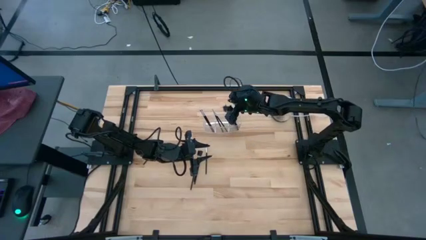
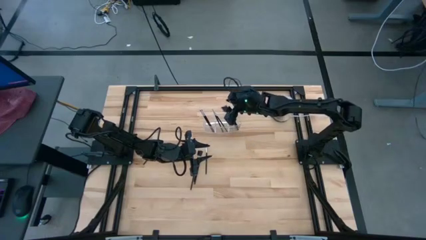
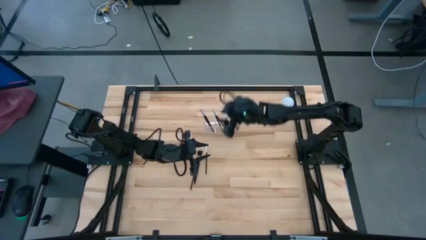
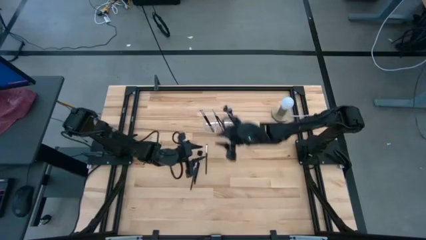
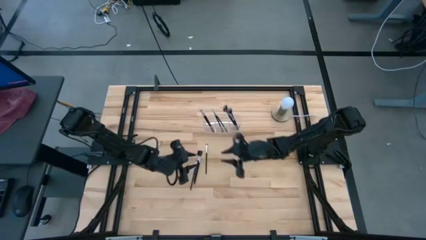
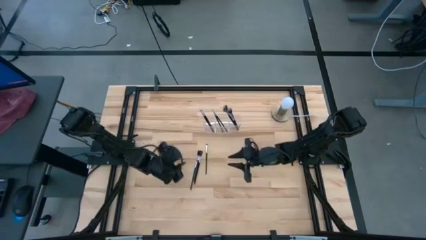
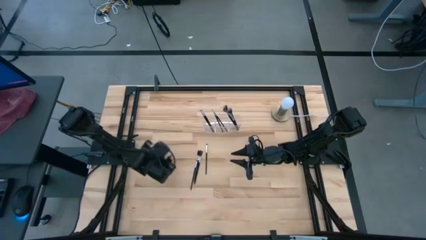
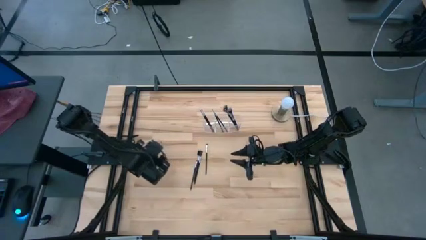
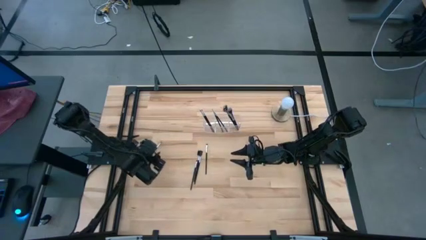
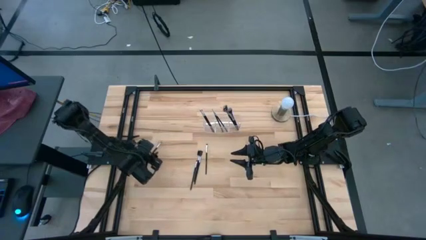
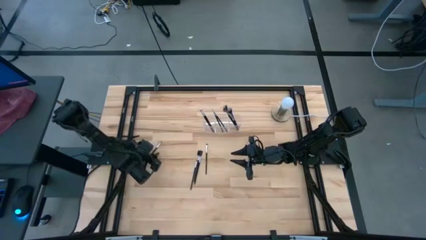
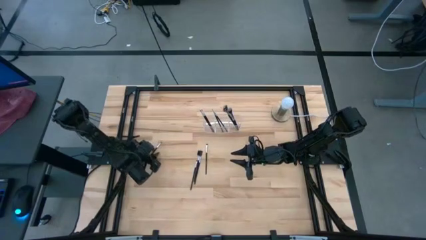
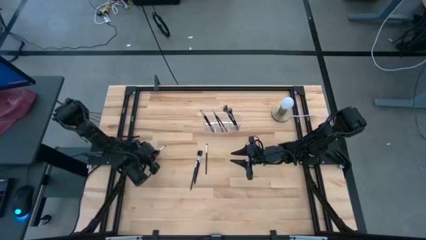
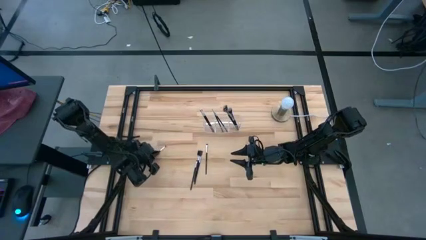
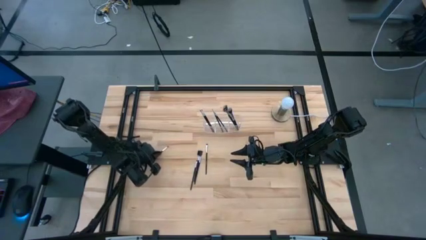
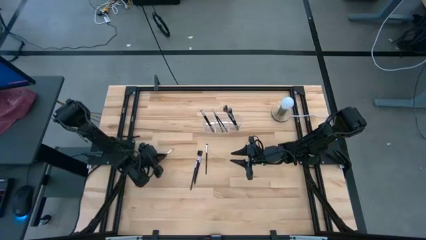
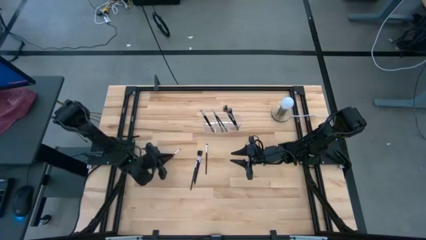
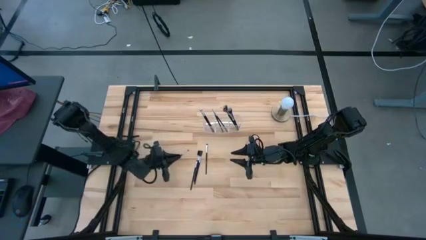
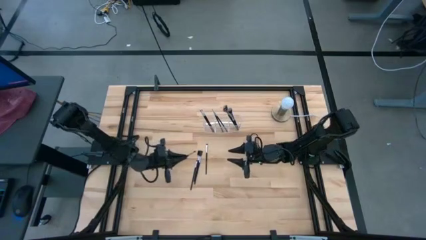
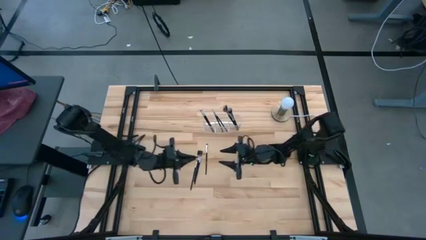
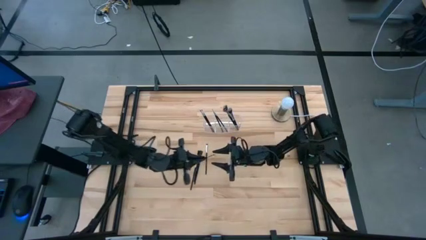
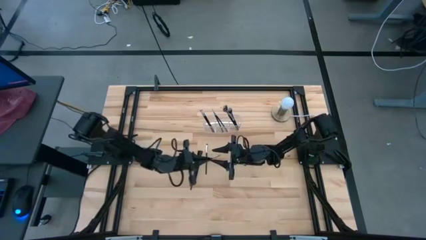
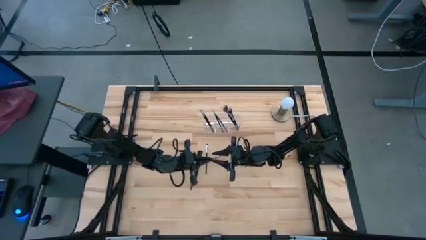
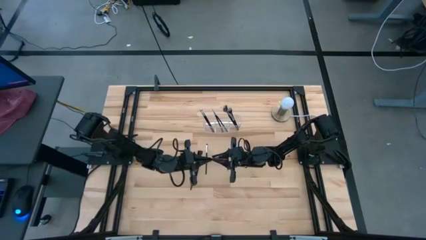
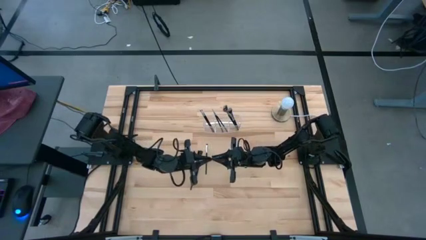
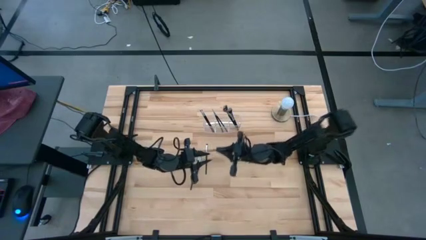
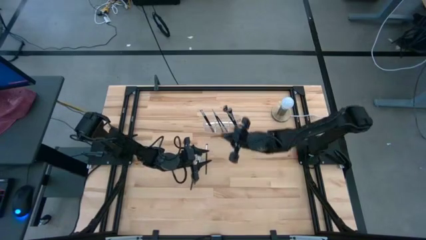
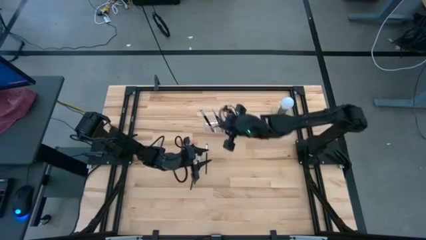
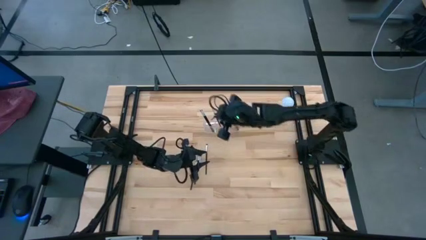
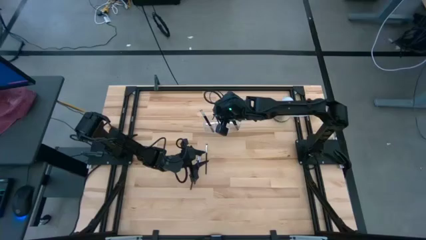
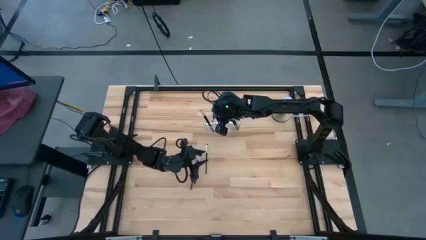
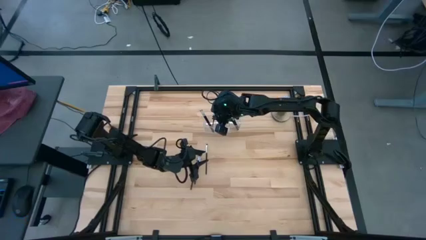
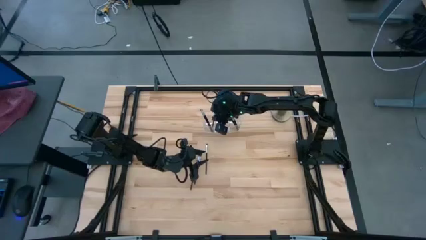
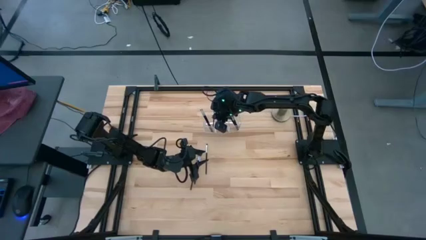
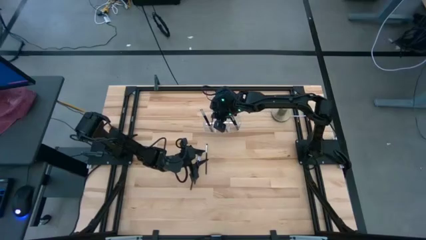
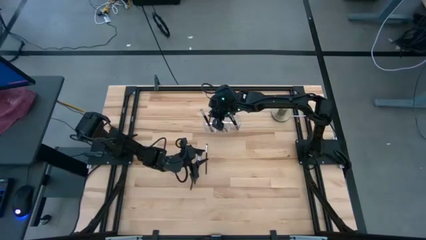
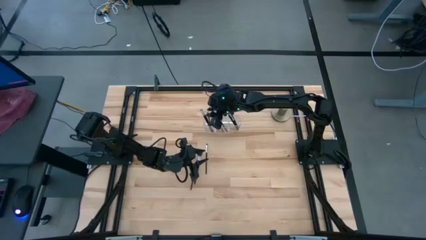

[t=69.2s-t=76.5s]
Task: Put items in baskets/containers
Put the black eyeshadow brush into the transparent organizer

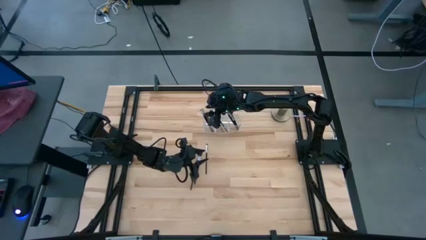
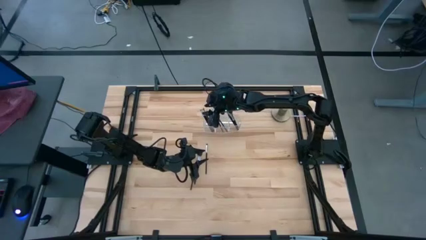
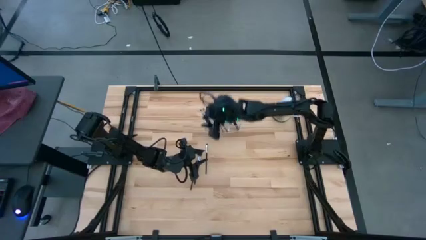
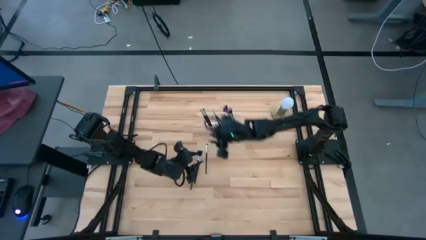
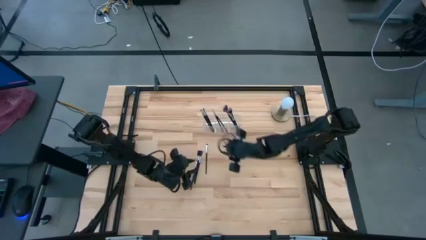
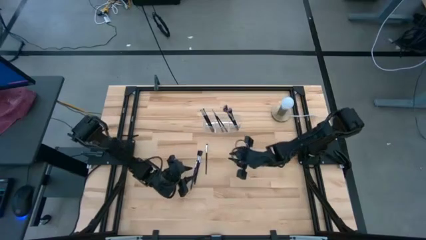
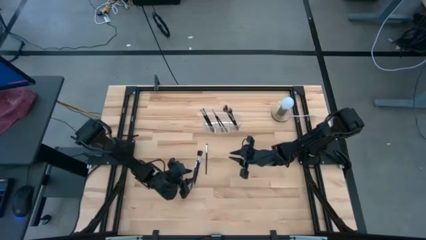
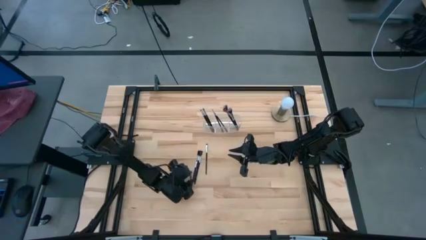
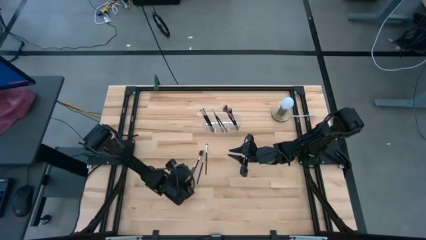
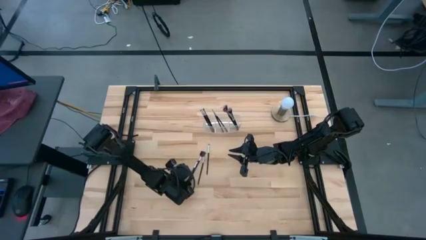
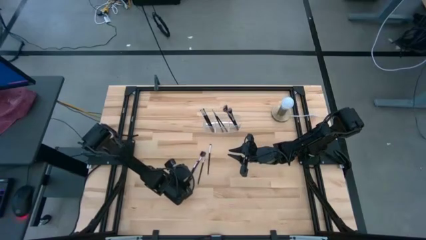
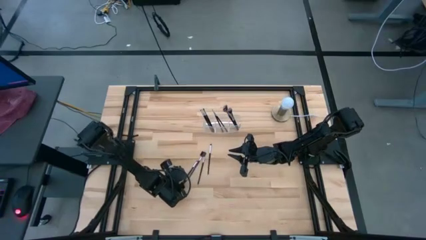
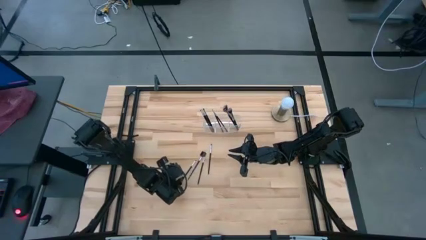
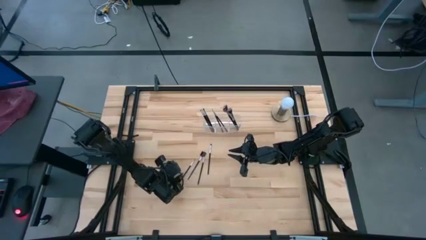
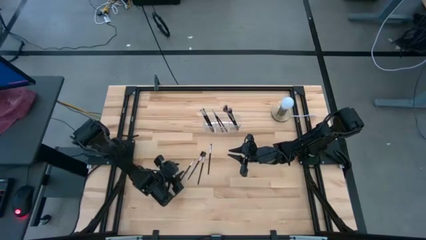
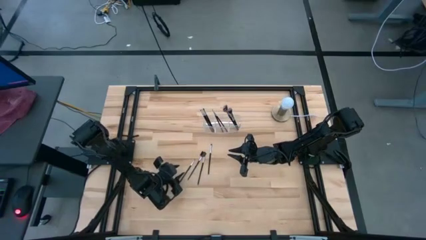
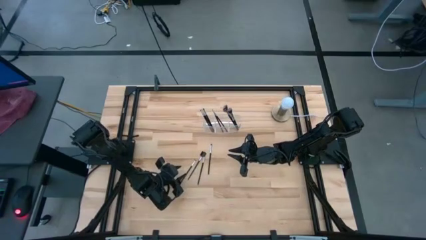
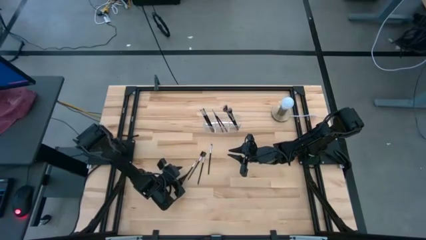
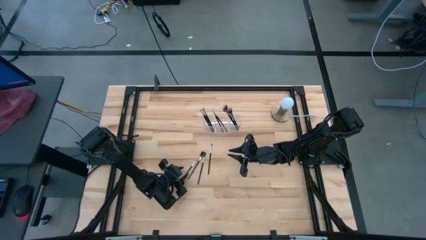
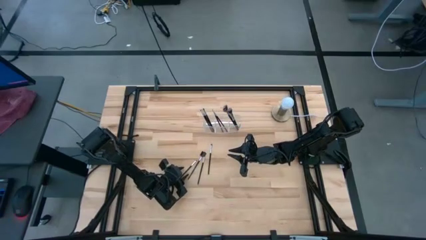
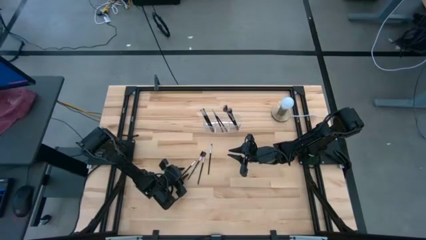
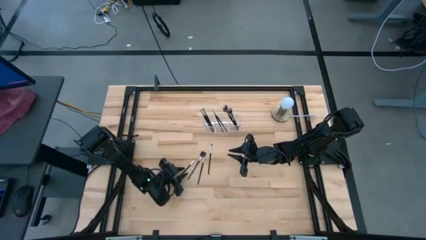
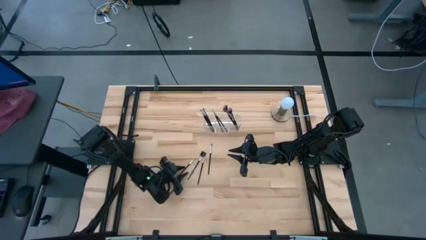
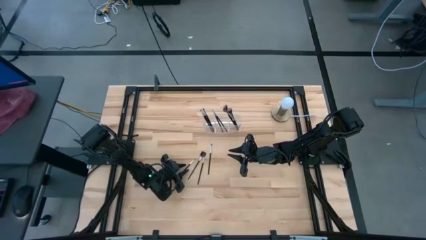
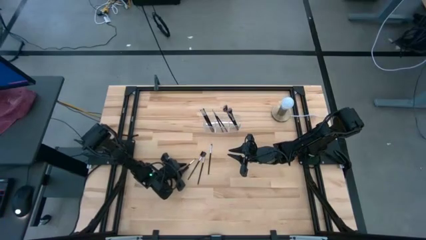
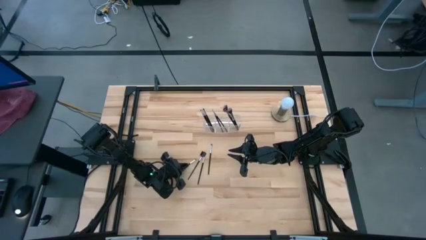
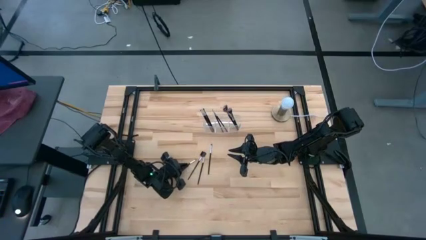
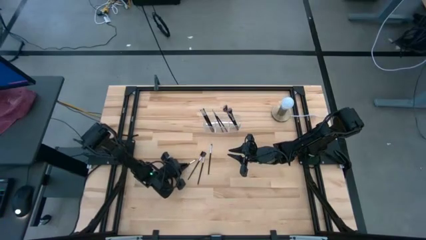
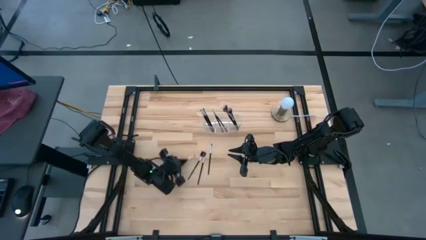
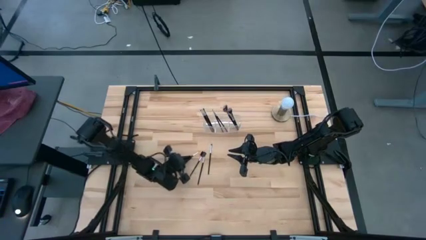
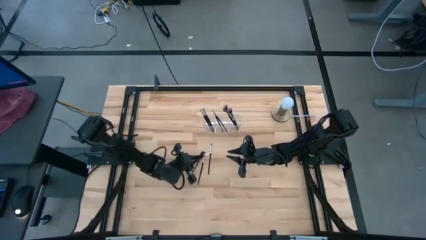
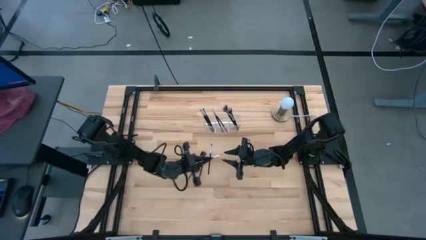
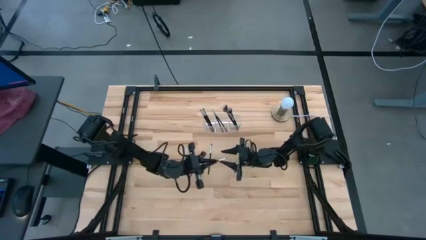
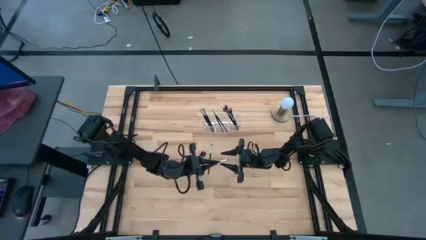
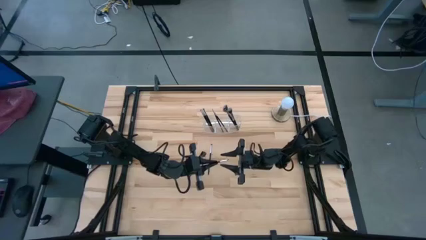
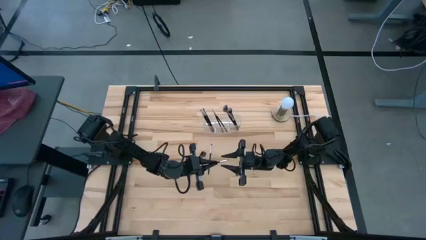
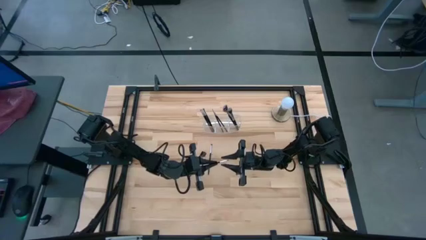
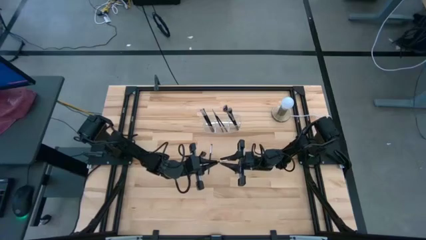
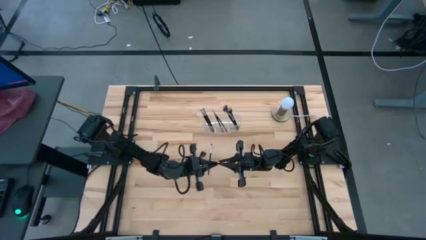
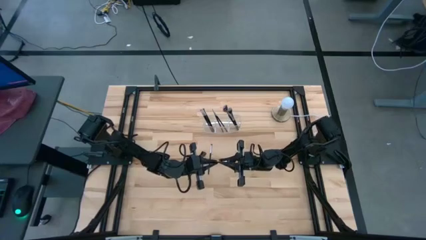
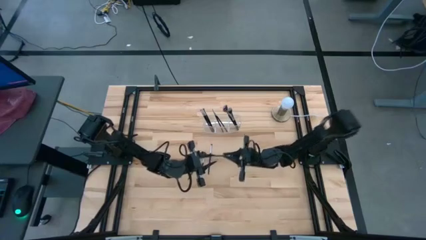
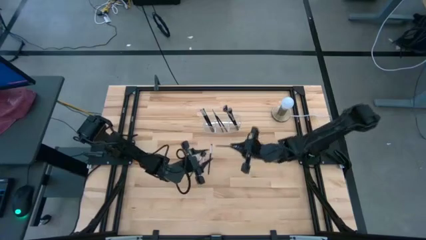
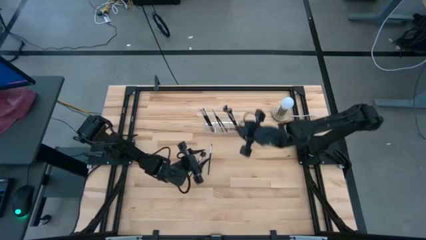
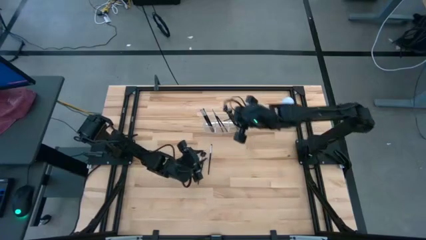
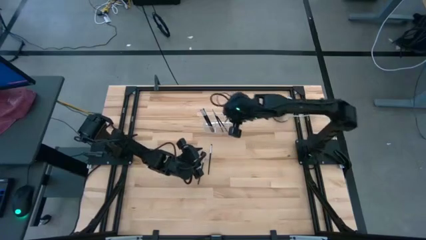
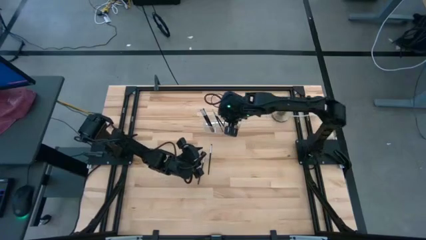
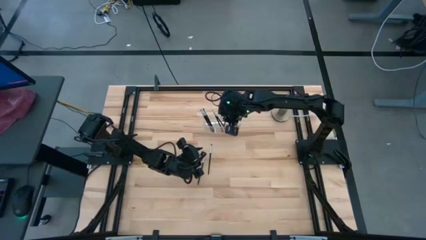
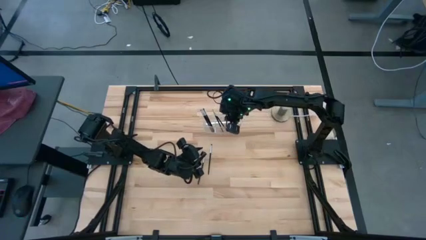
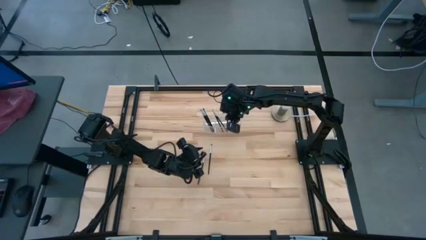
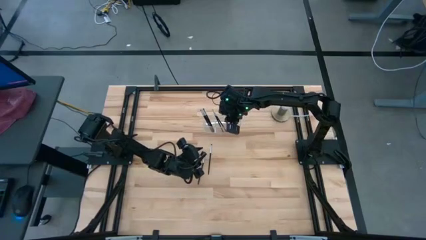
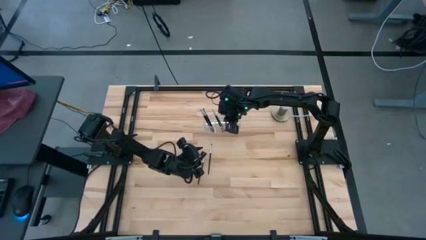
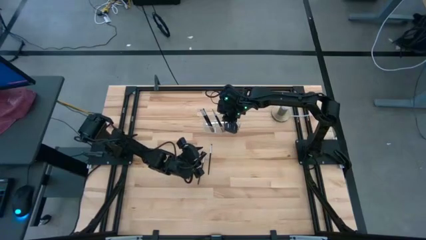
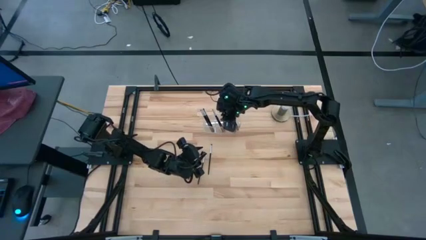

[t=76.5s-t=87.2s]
Put the black eyeshadow brush into the transparent organizer
